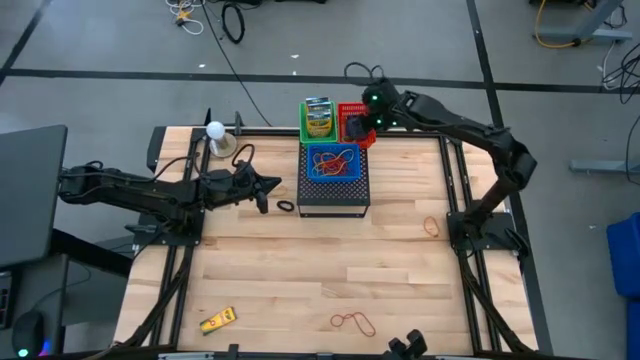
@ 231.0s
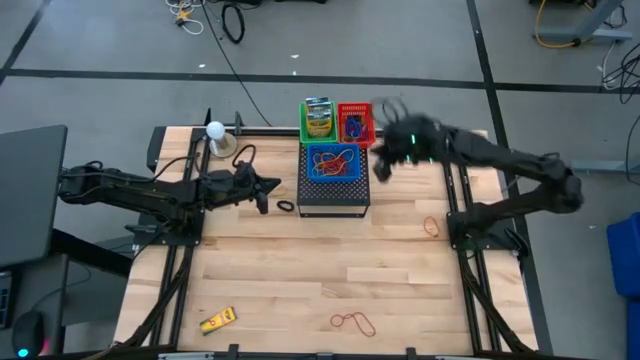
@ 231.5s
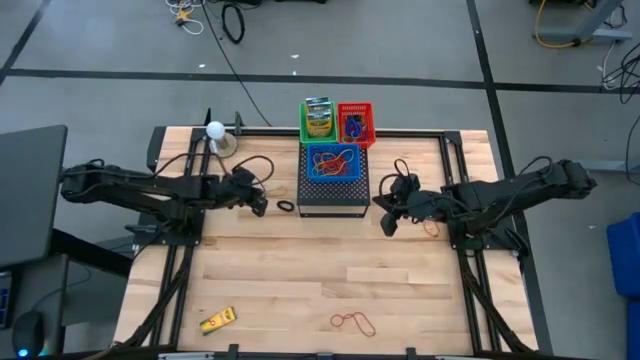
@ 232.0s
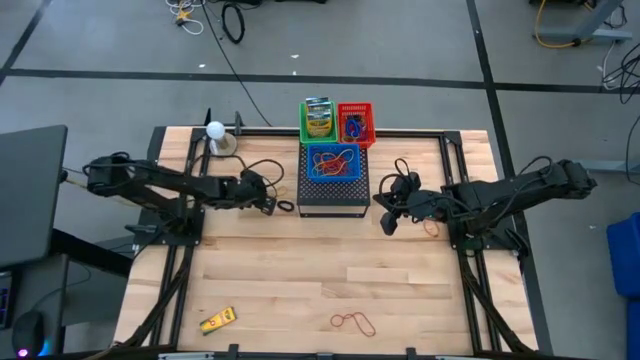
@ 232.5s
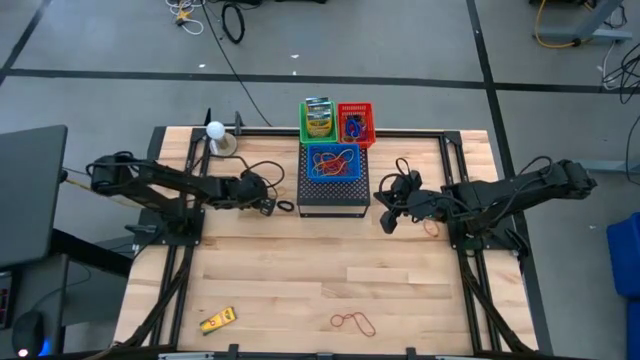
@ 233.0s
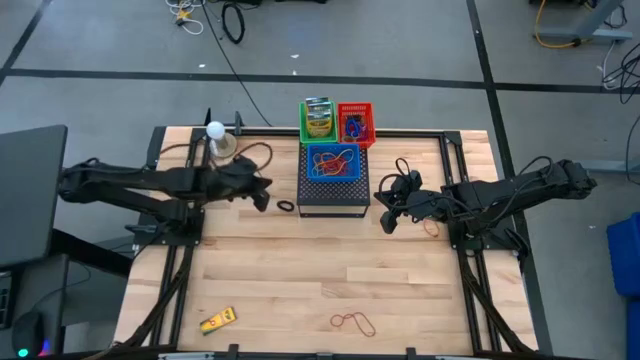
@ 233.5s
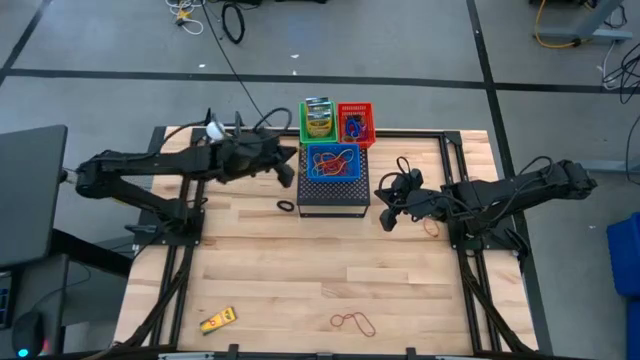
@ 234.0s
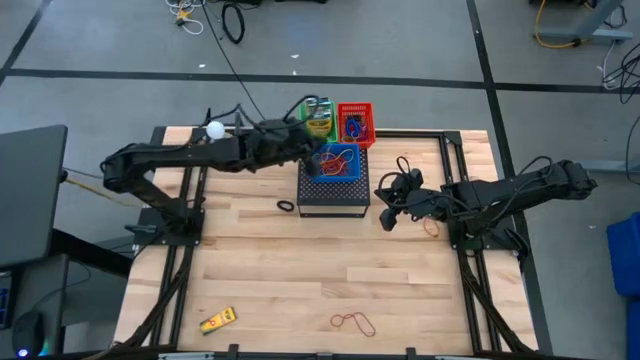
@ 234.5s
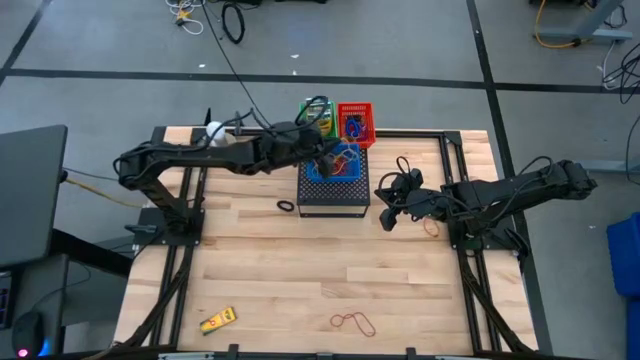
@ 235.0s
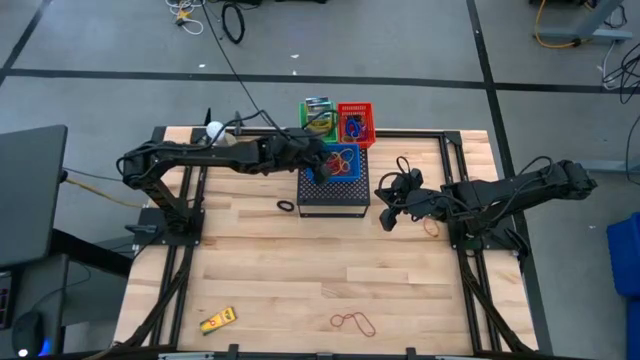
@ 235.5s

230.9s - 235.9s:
Task: Pick & Place Office Desk Supplies
Put the yellow rubber band into the blue bin on the shelf

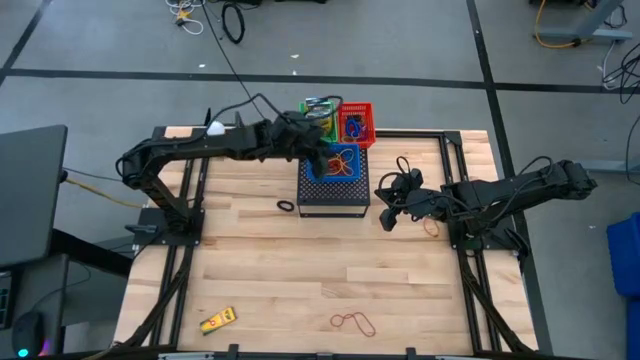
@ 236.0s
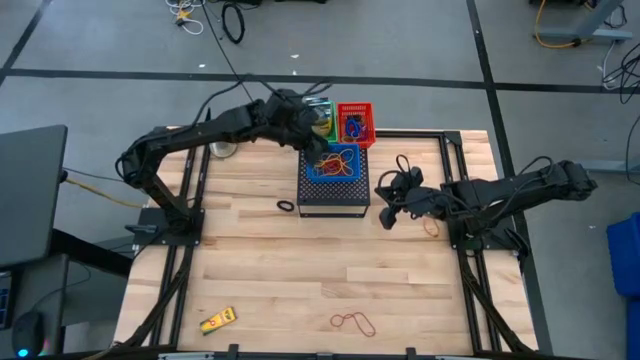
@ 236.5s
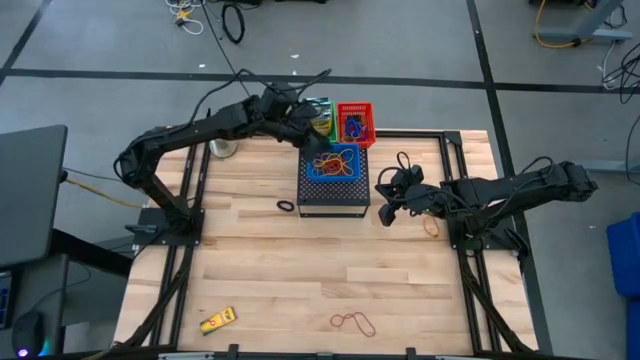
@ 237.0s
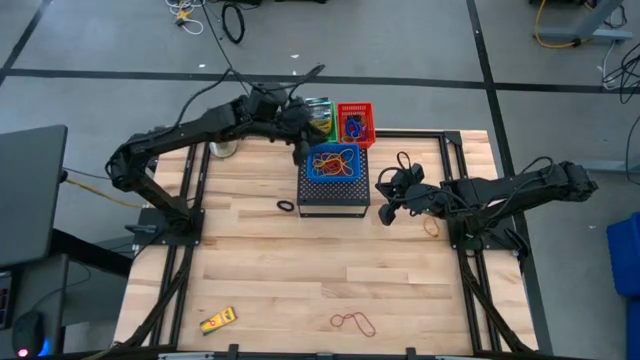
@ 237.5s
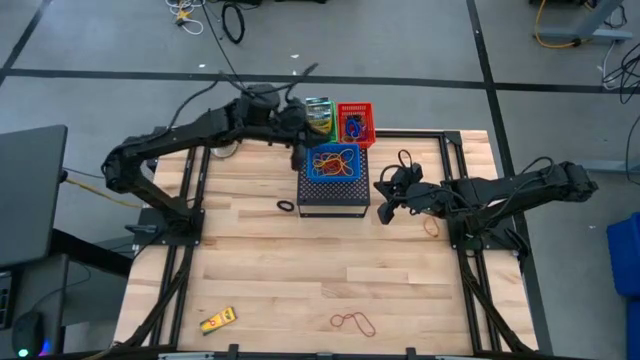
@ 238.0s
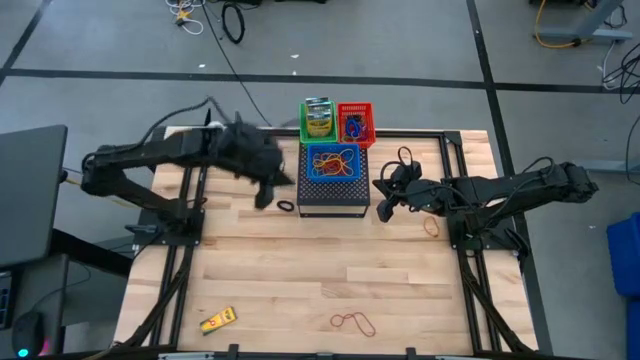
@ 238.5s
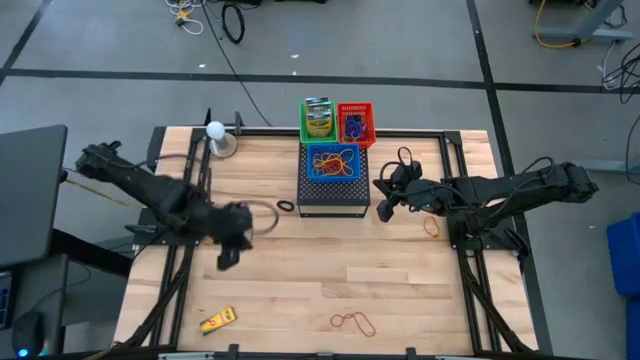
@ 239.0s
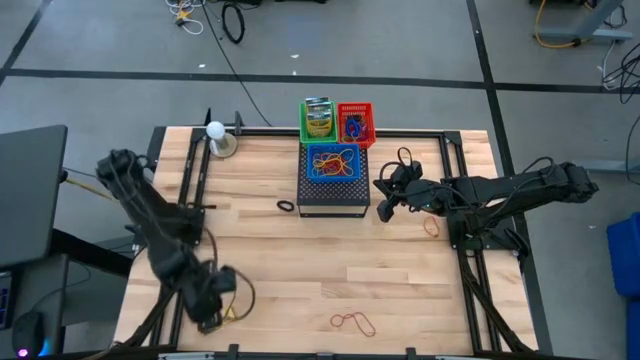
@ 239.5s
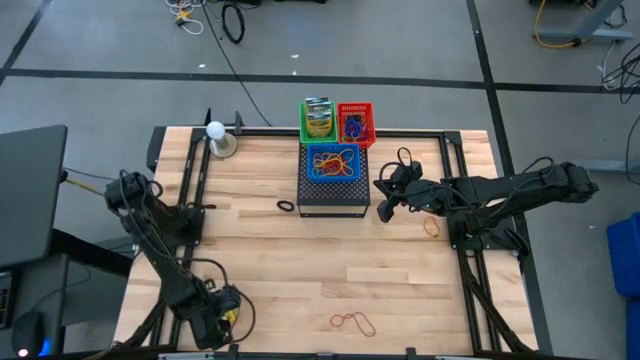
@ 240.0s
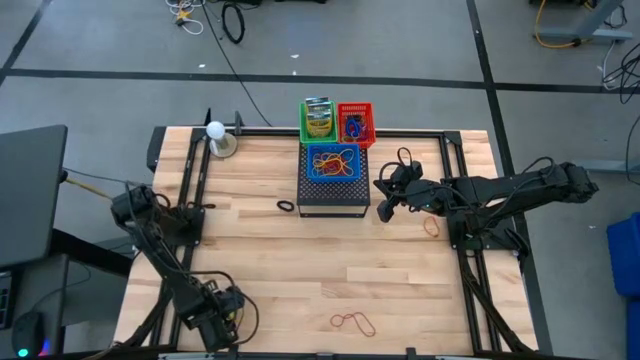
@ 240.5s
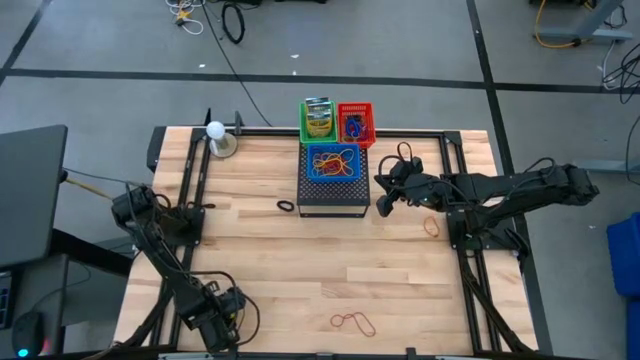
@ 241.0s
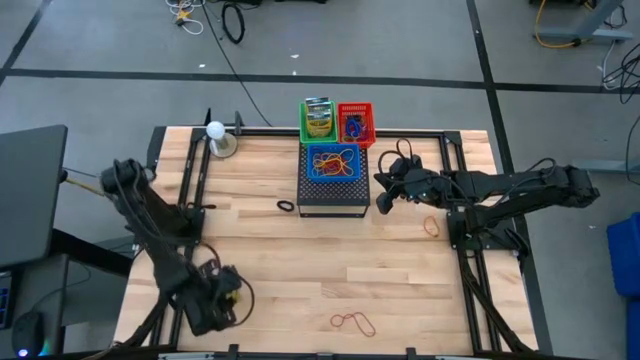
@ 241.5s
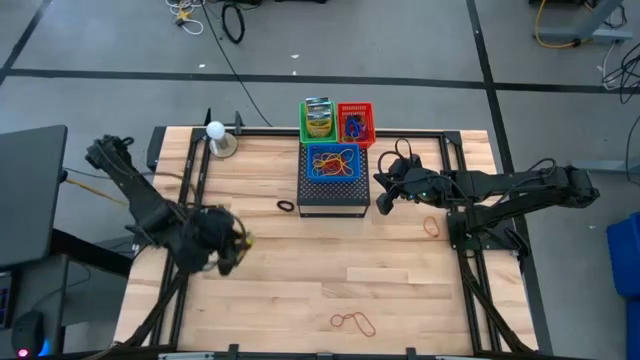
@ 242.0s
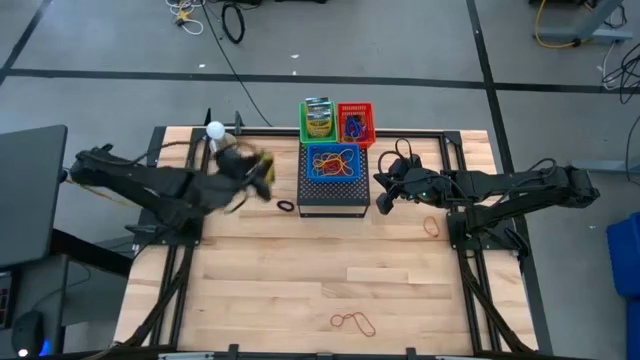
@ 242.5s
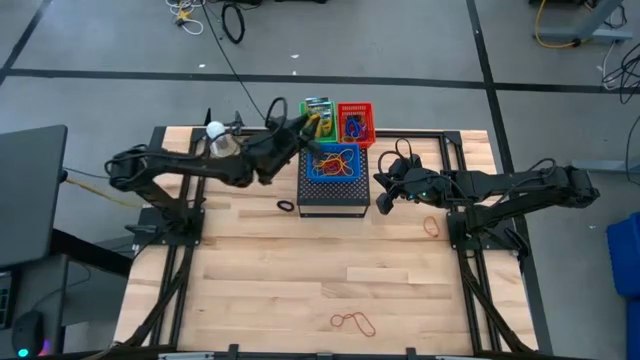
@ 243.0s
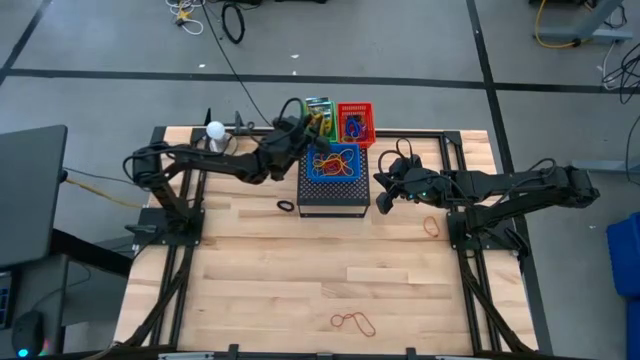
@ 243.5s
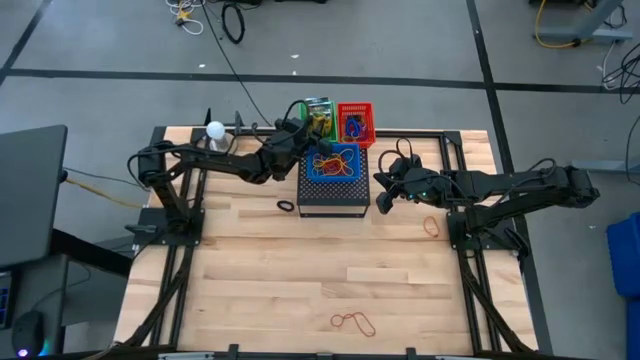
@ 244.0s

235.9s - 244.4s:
Put the small box of crayon into the green bin on the shelf

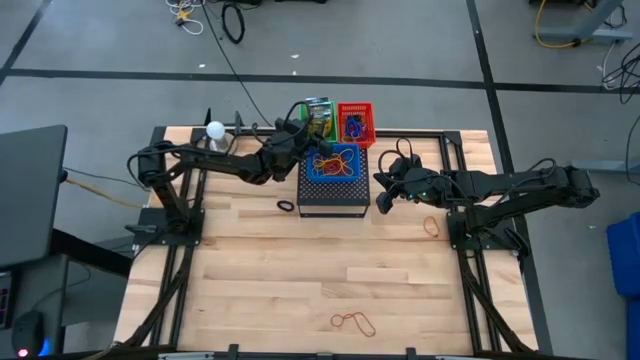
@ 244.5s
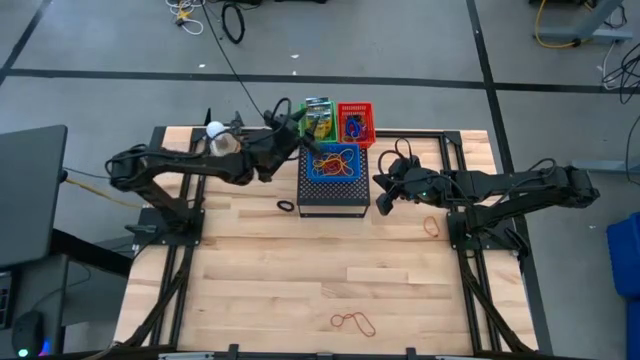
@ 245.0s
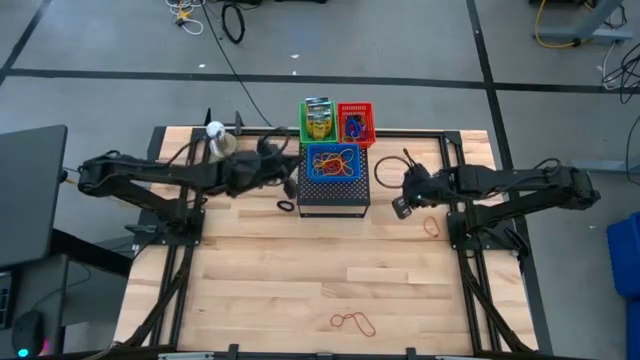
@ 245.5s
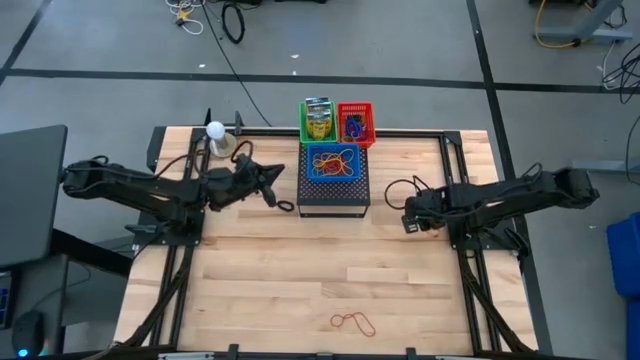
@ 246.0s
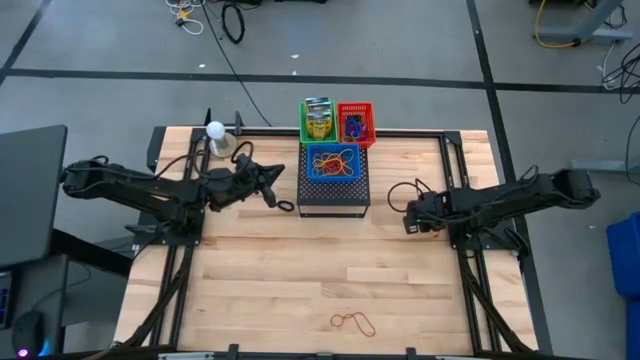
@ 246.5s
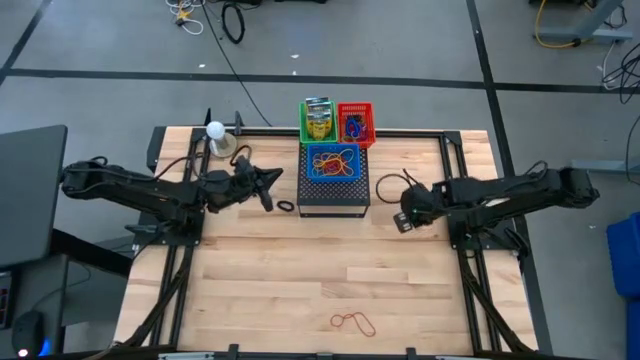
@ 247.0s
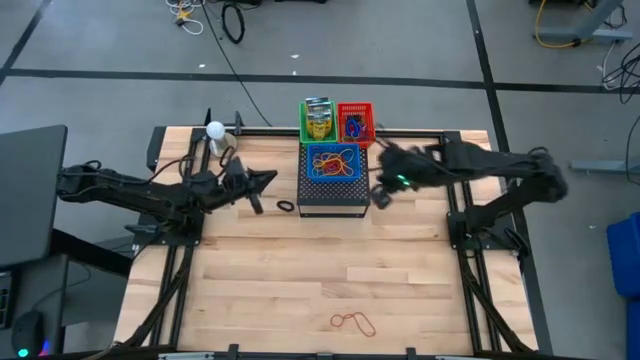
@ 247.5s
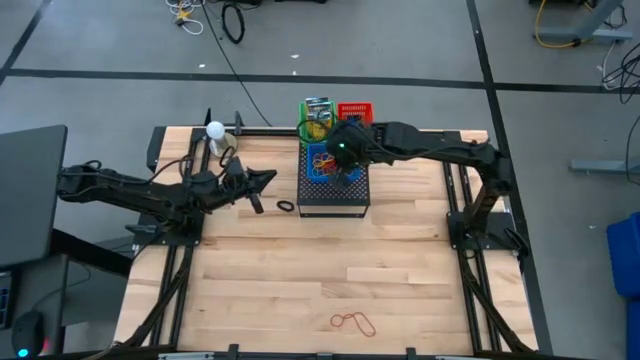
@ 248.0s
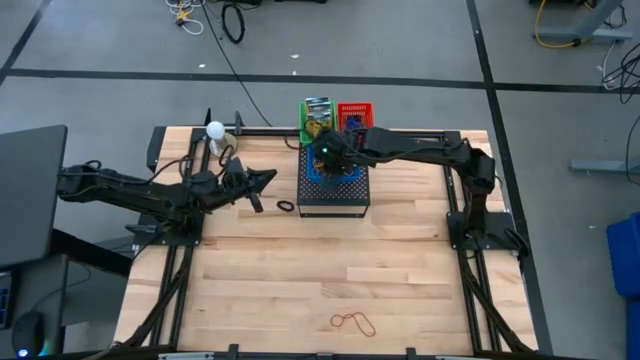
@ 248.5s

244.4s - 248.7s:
Put the orange rubber band into the blue bin on the shelf

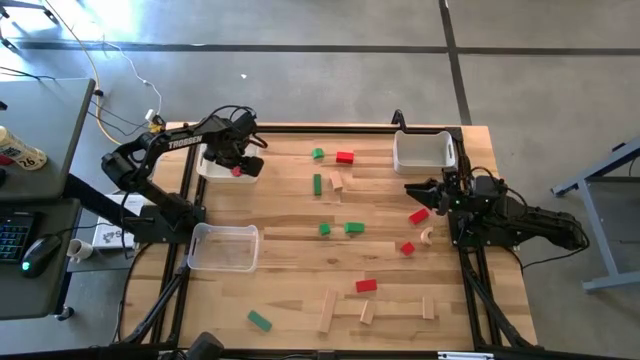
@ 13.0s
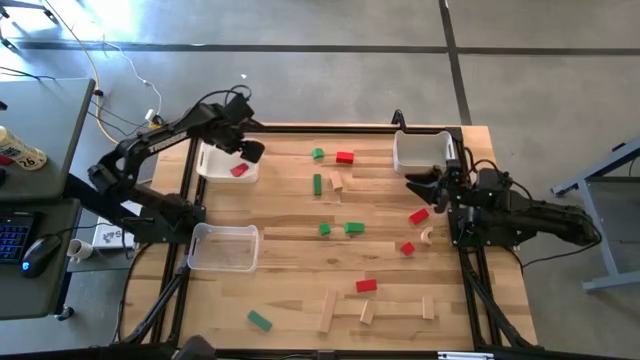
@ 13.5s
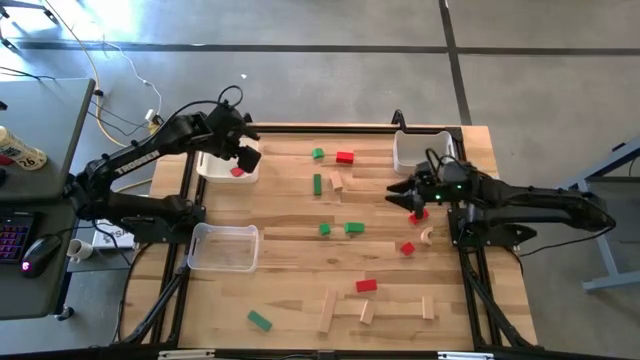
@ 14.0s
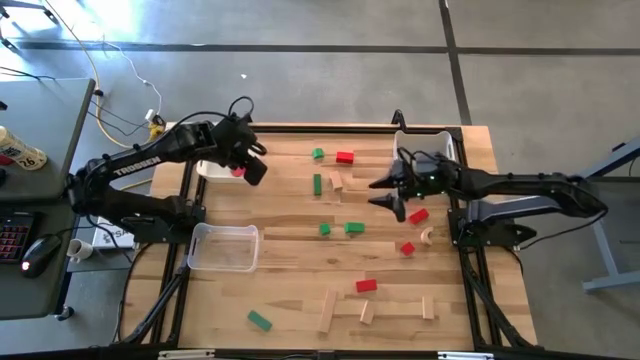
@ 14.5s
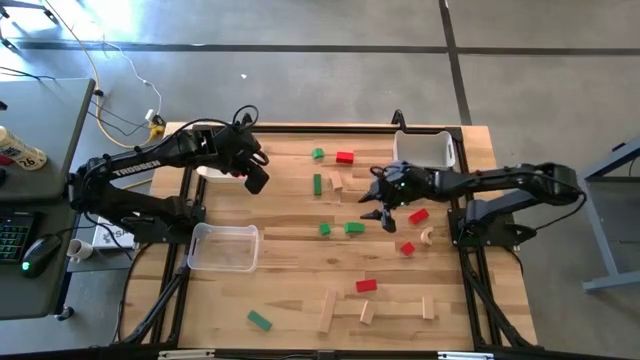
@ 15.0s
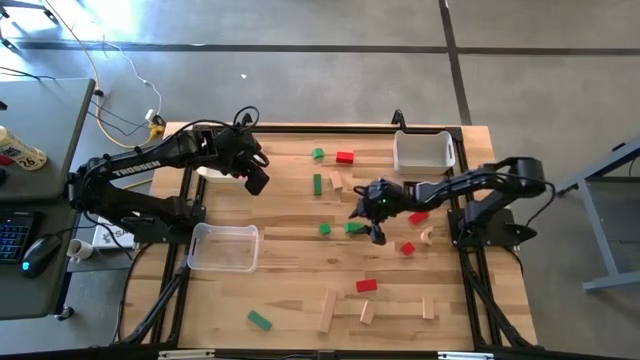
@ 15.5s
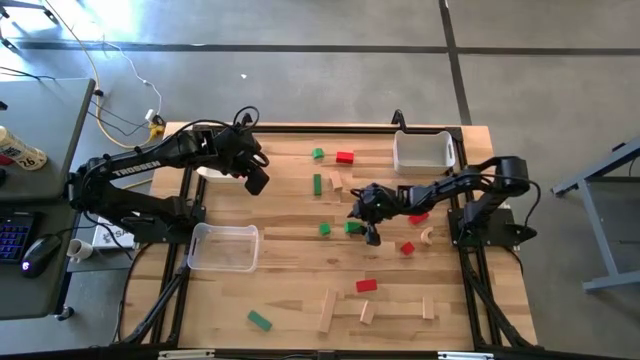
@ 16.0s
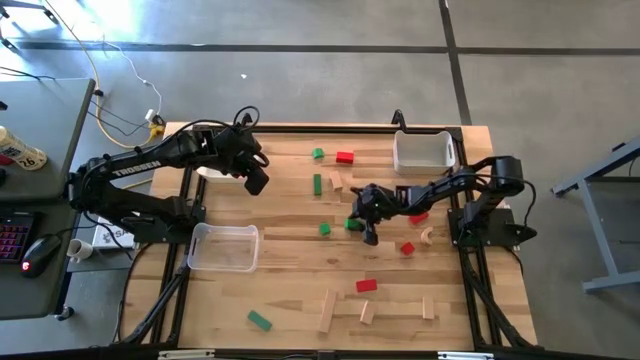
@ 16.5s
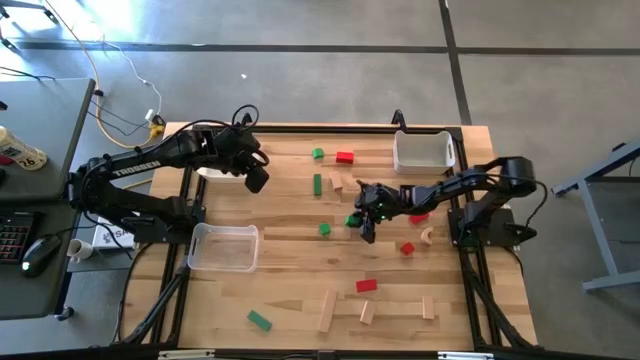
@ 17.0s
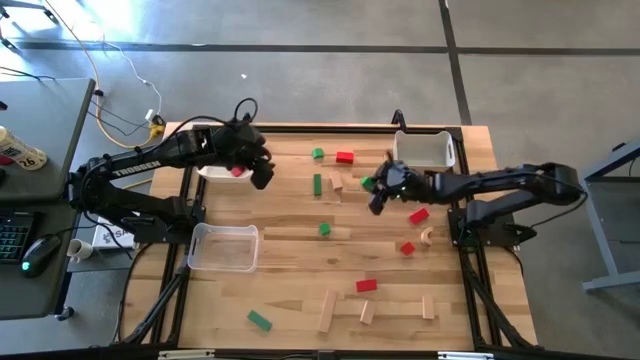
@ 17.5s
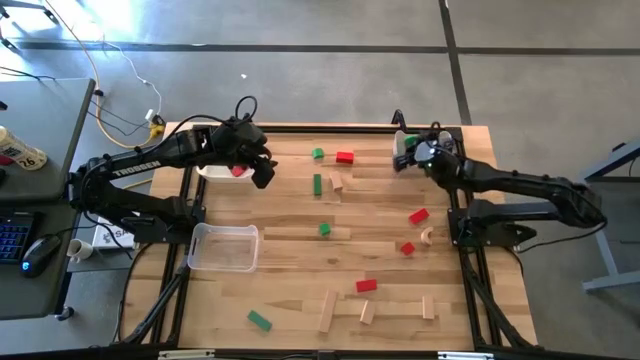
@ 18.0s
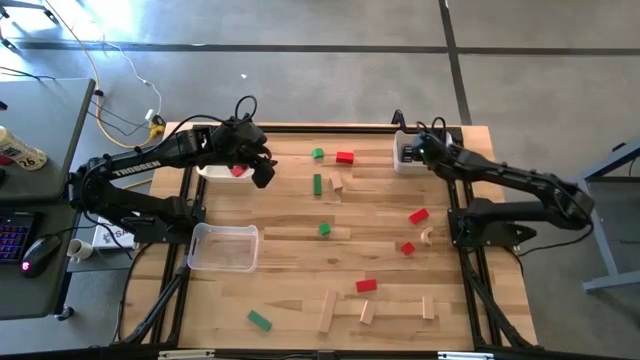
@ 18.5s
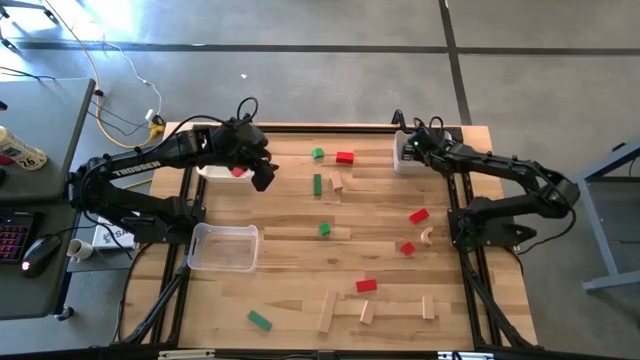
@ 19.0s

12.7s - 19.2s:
Task: Sort & place blocks by color
Put the green rectangle into the right white bin
